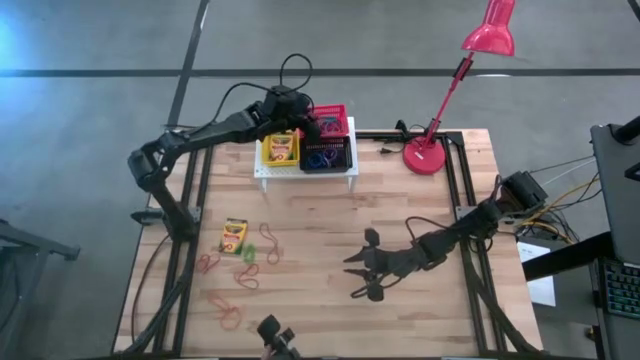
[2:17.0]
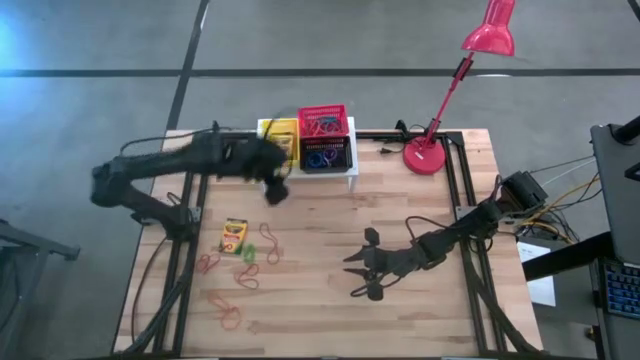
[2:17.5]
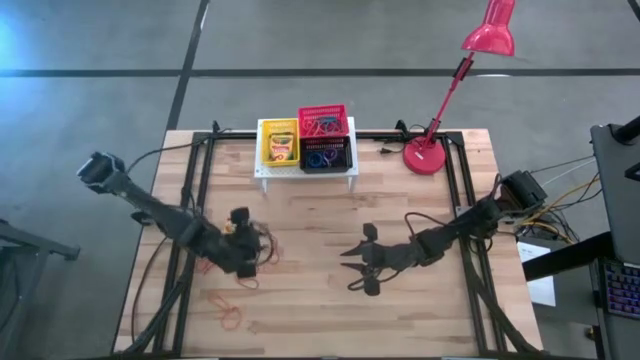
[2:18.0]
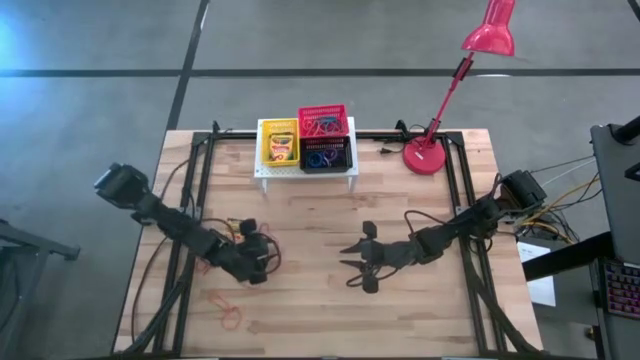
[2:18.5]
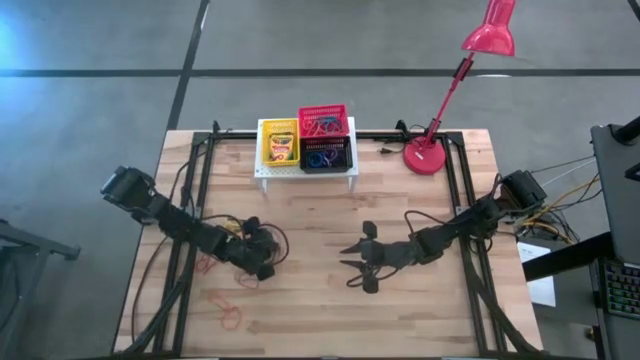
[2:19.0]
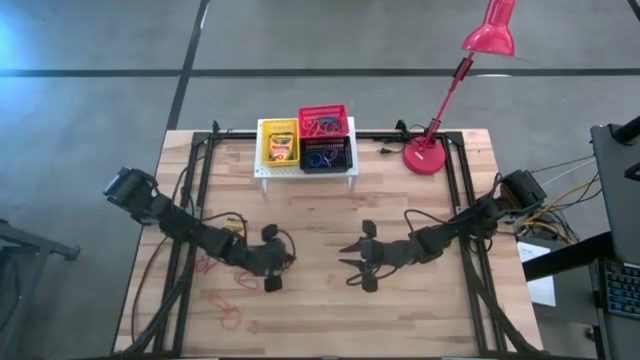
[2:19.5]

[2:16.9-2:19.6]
Task: Pick & Place Office Desk Supplies
Put the red rubber band into the black bin

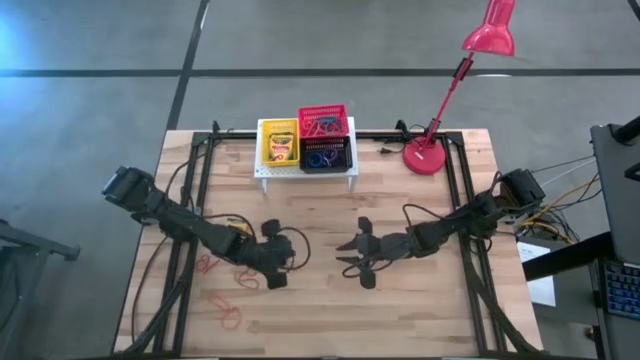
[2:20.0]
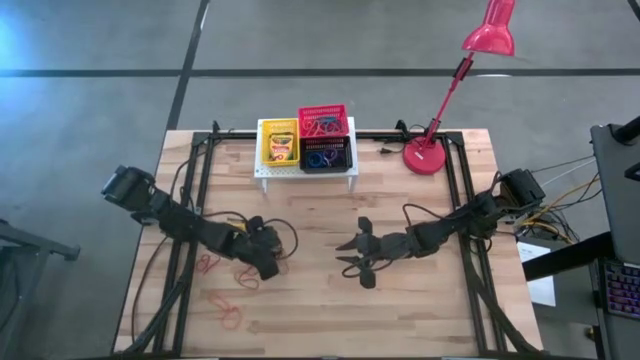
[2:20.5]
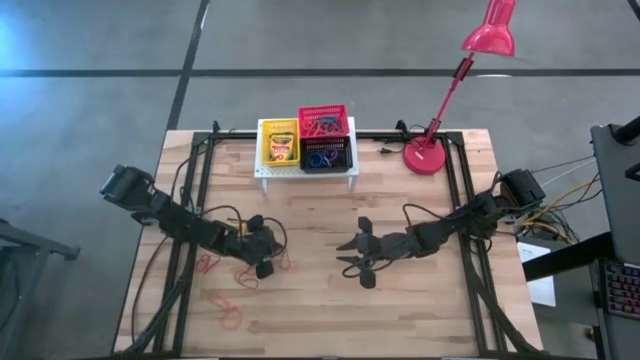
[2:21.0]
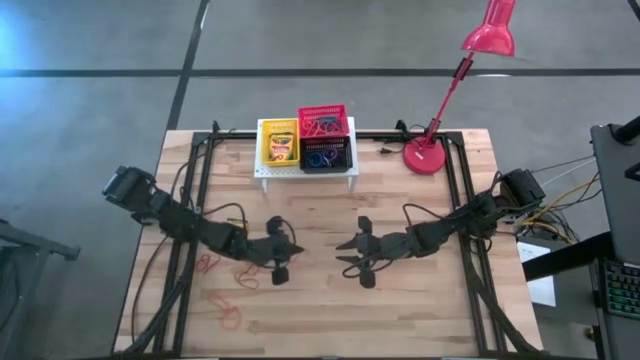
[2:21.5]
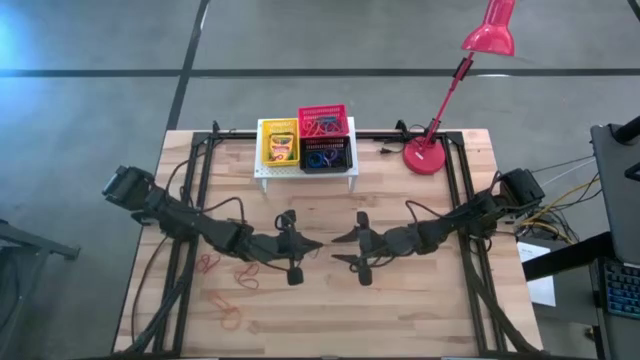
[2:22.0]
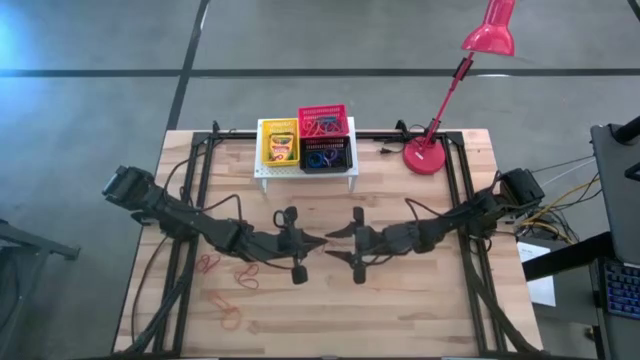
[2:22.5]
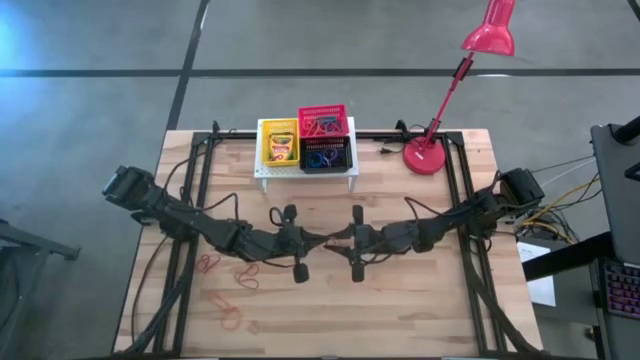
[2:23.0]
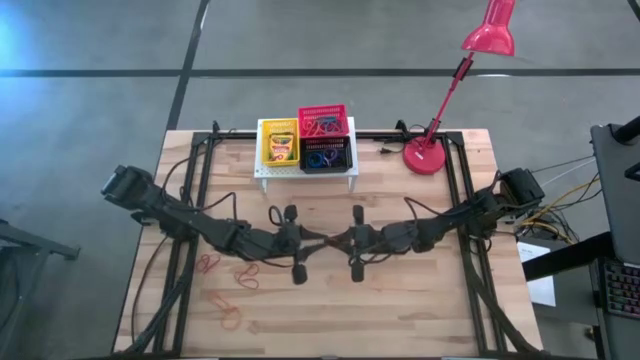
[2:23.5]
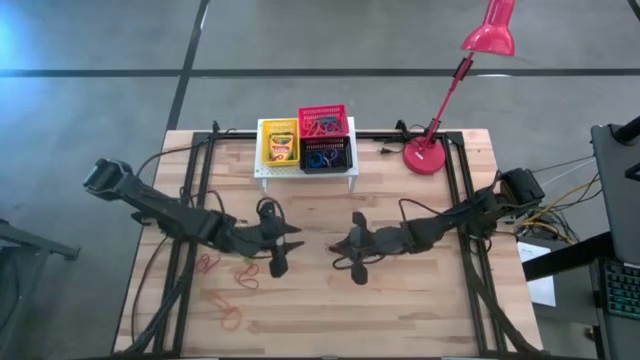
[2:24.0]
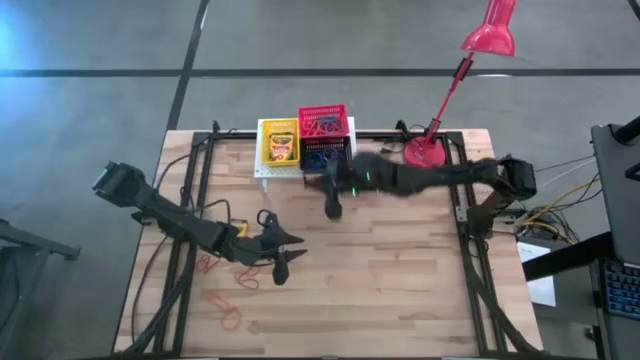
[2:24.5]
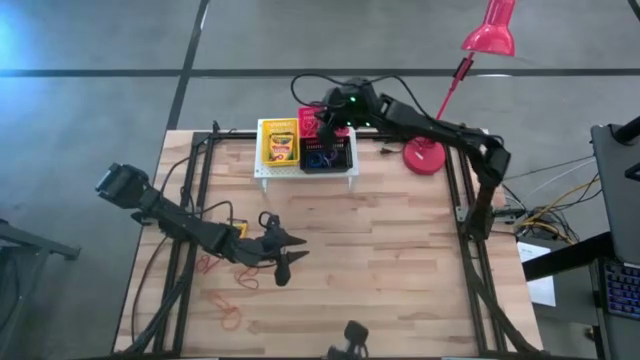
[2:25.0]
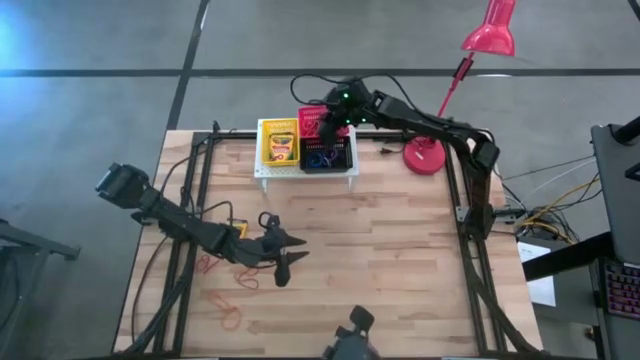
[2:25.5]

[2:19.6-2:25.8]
Put the red rubber band into the black bin

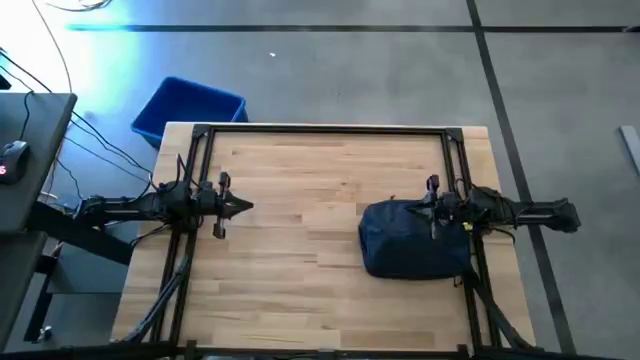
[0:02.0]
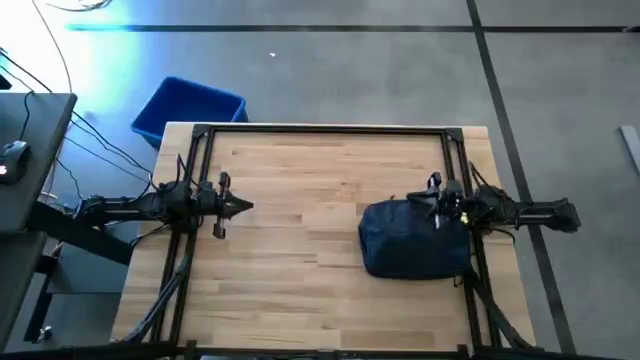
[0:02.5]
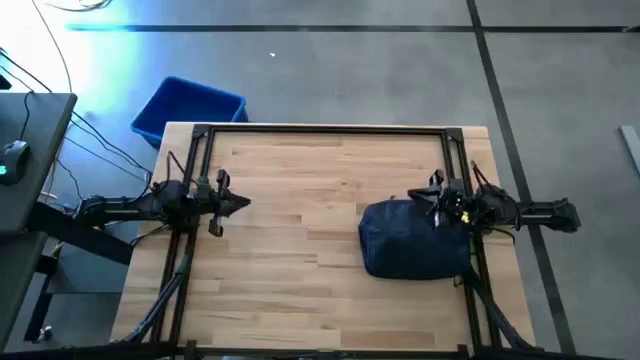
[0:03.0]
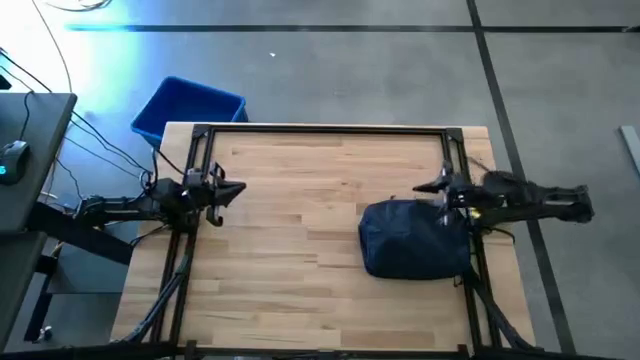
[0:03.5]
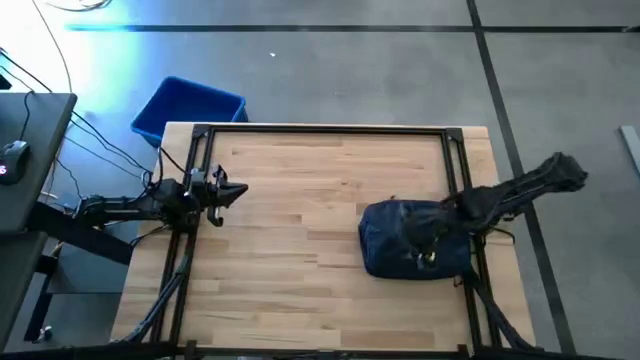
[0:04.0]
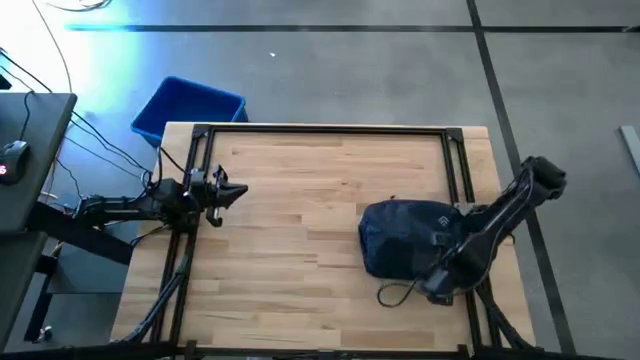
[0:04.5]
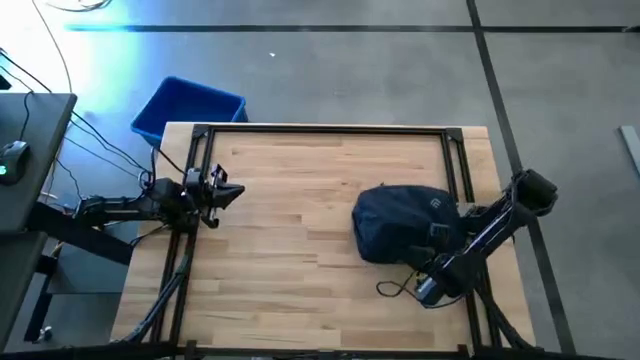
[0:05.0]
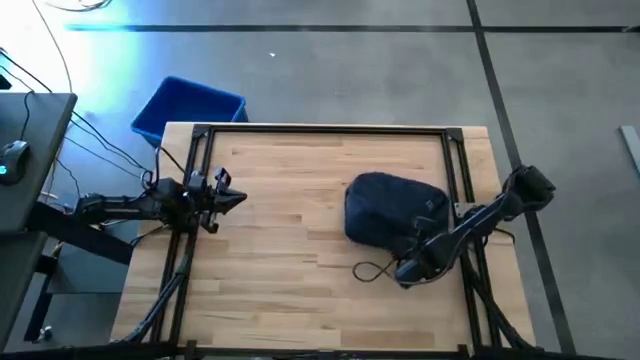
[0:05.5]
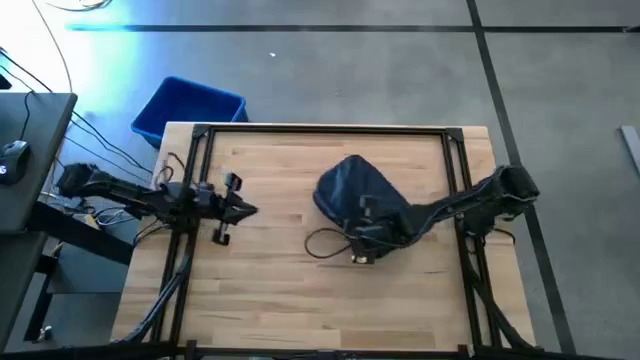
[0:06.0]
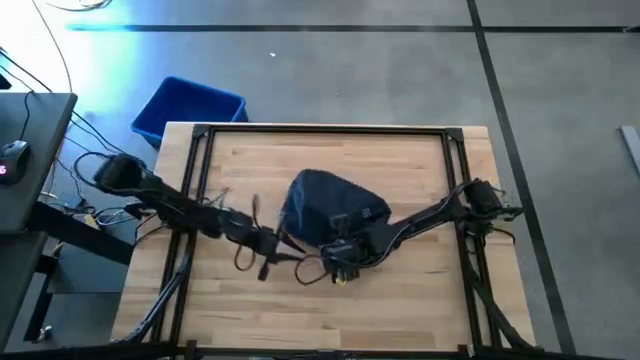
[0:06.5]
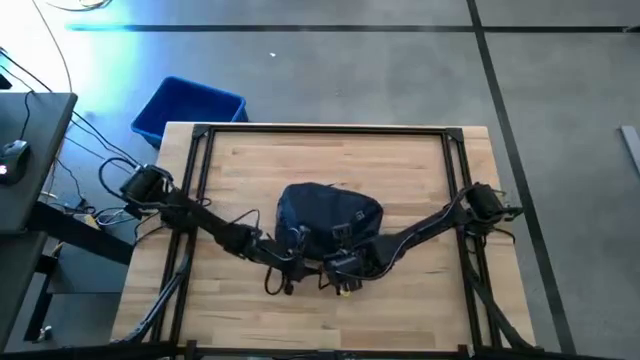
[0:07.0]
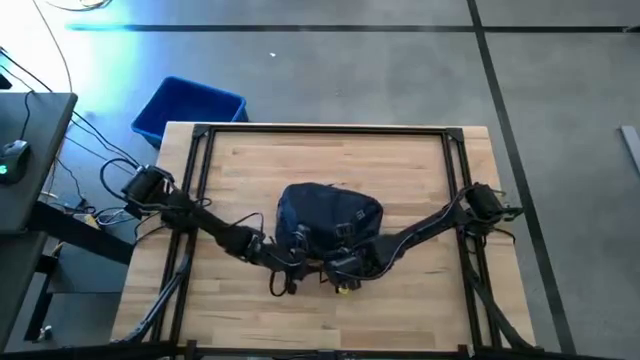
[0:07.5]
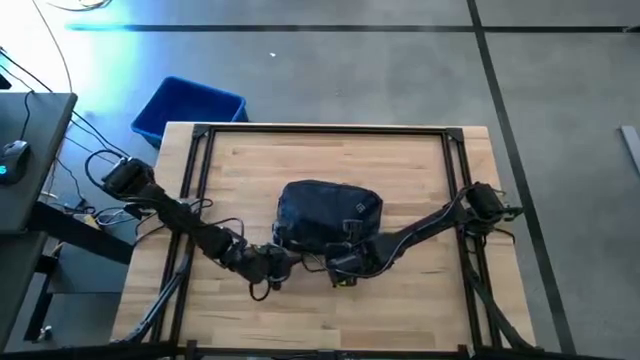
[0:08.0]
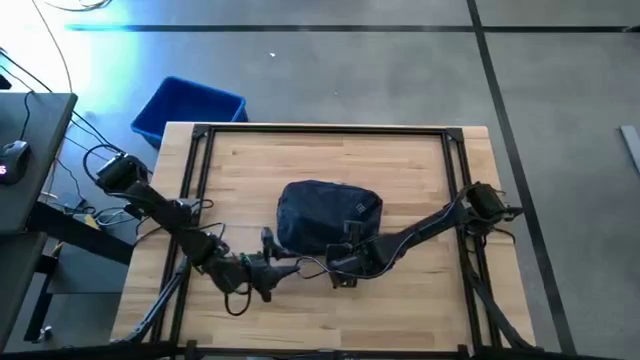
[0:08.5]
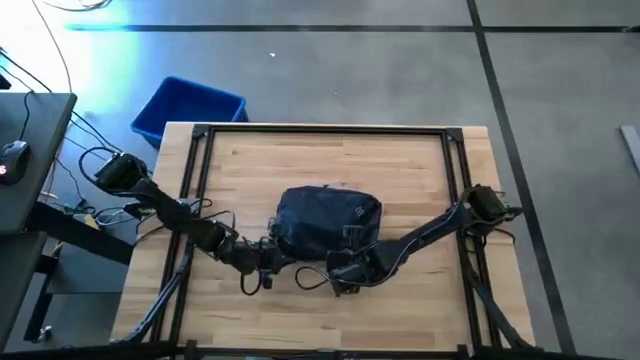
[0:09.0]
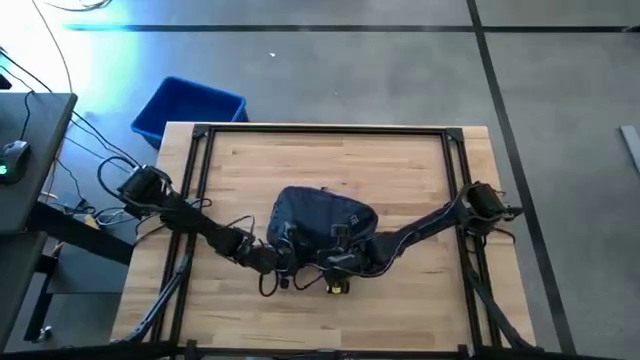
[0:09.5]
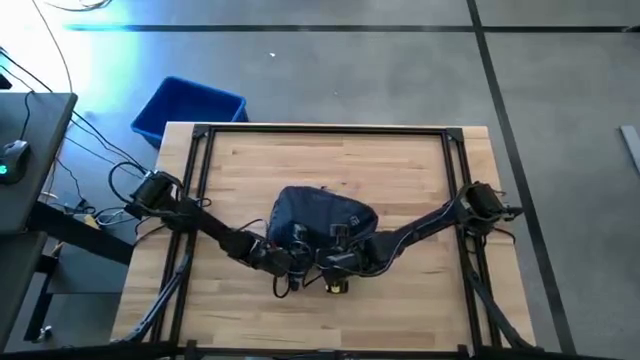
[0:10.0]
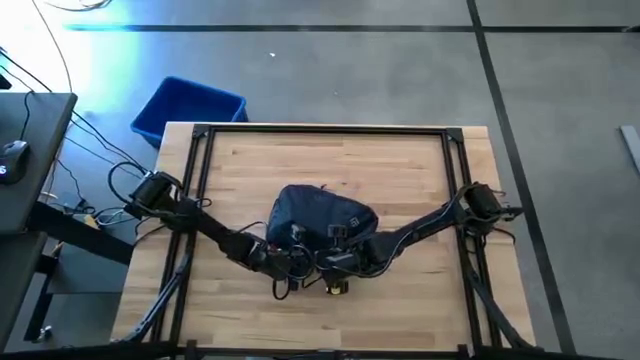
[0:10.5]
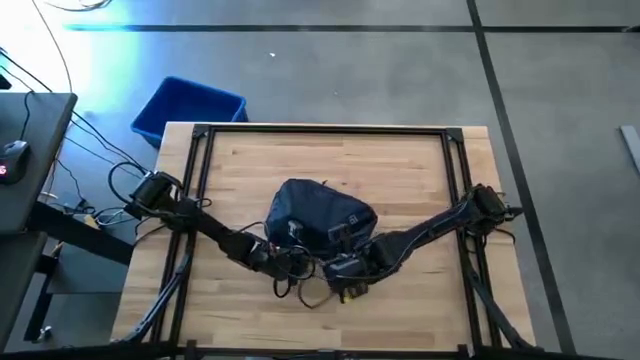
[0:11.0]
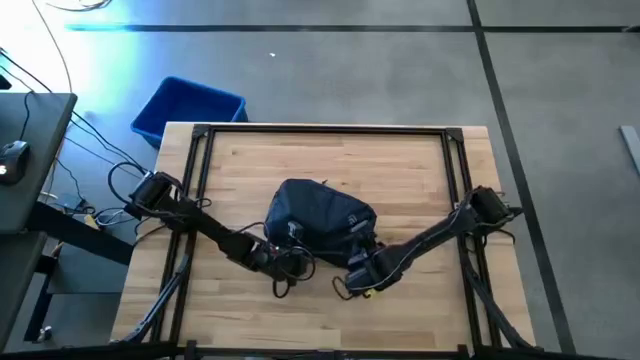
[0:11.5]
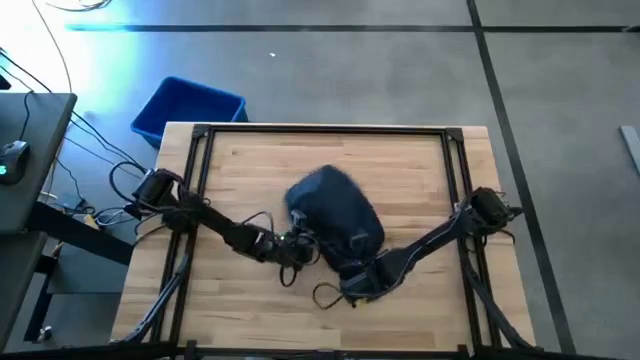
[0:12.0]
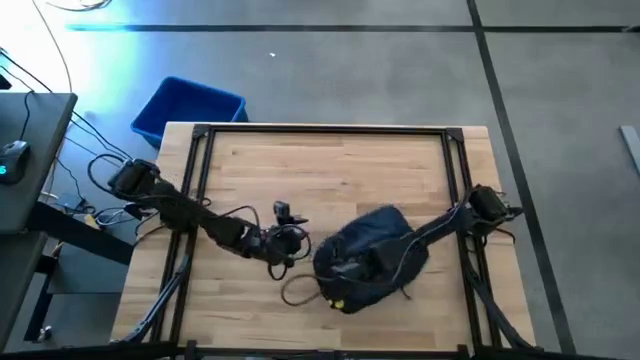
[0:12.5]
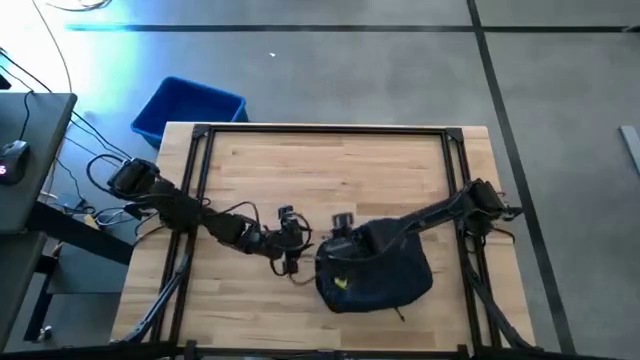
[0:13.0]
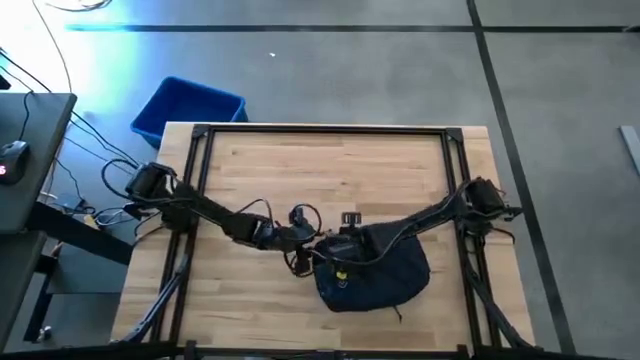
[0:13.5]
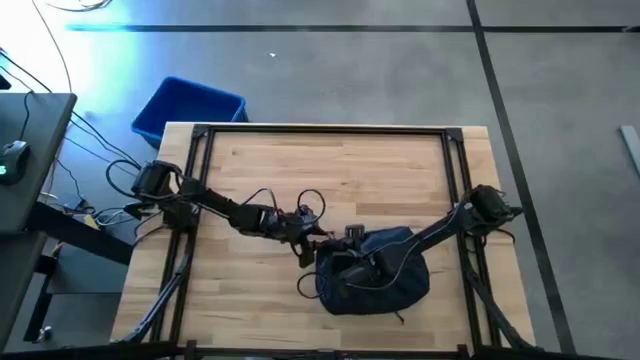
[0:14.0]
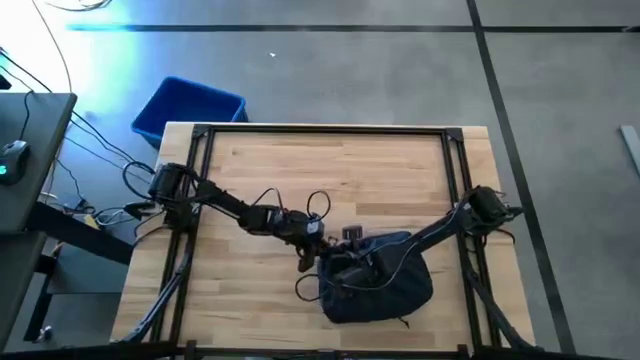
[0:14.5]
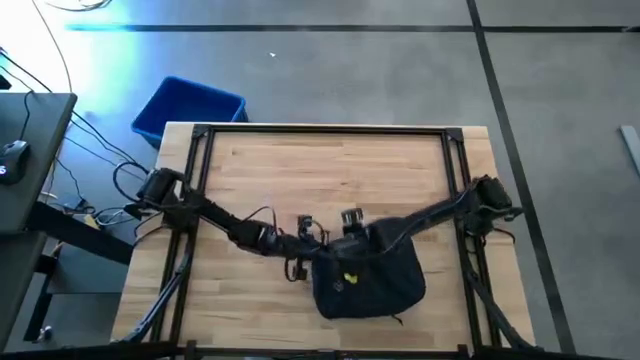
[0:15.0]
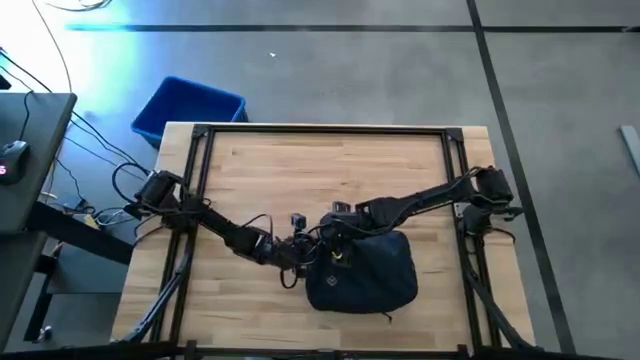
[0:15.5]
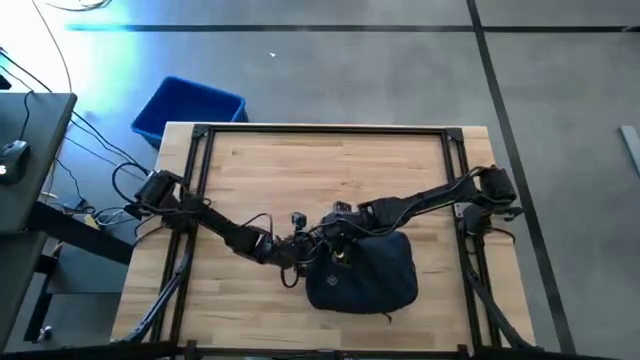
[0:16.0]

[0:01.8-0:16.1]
Task: Unpack backpack
Open the backpack
